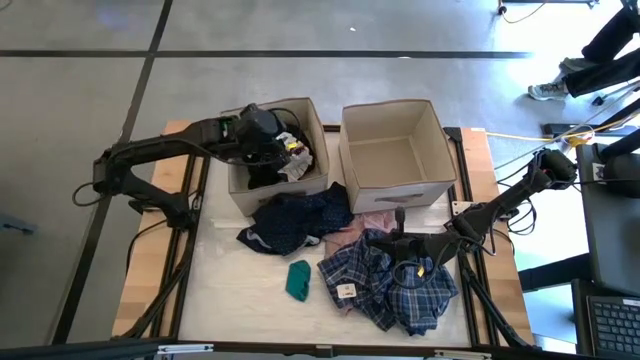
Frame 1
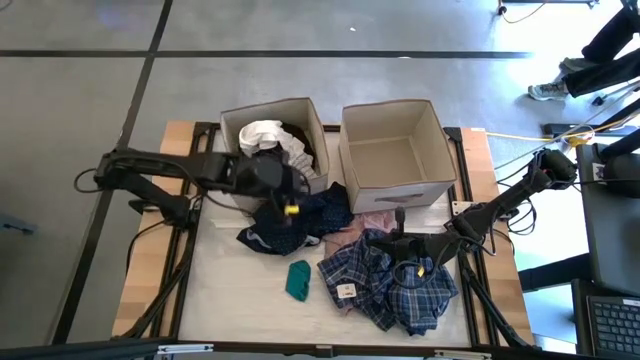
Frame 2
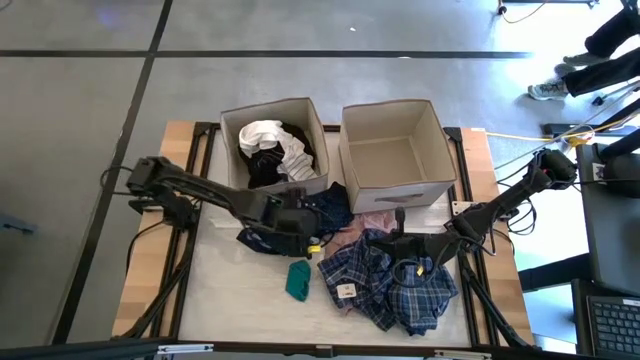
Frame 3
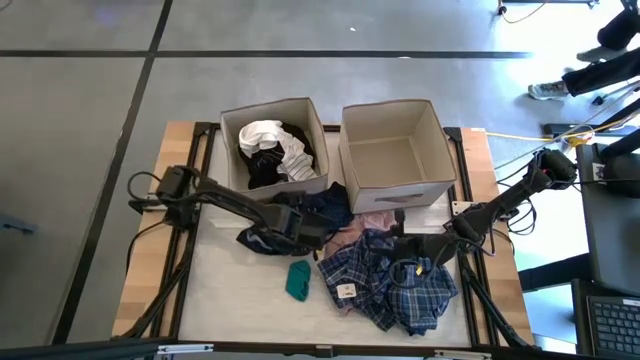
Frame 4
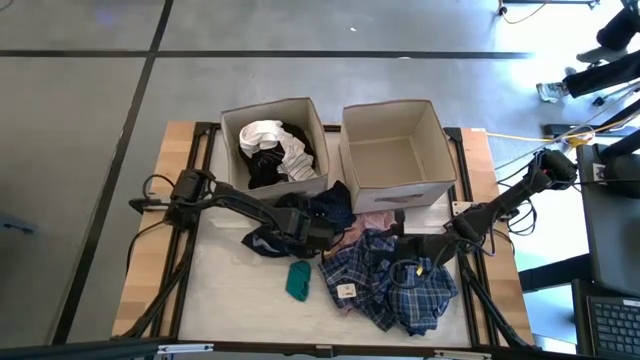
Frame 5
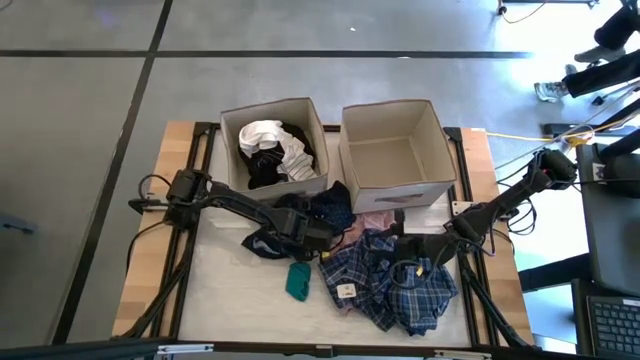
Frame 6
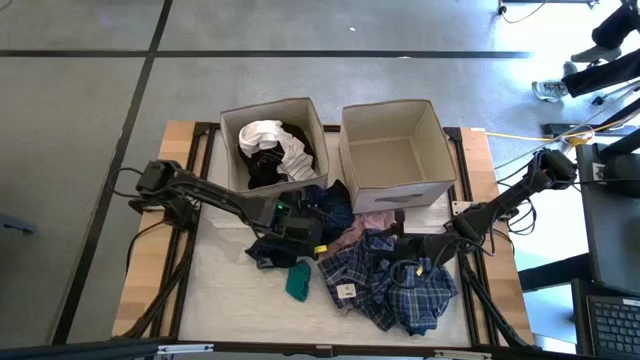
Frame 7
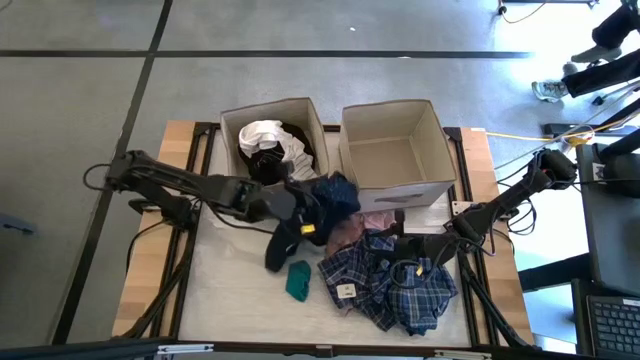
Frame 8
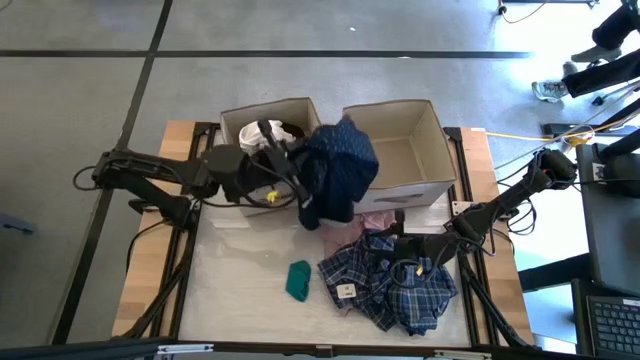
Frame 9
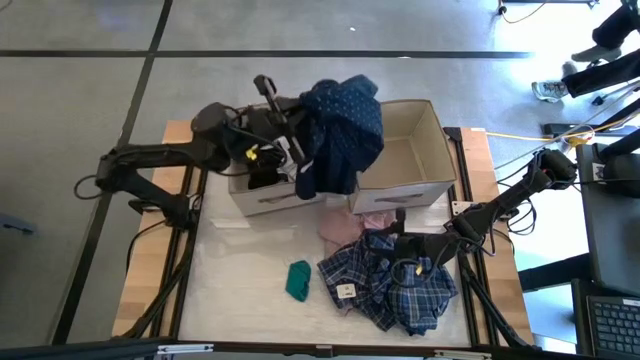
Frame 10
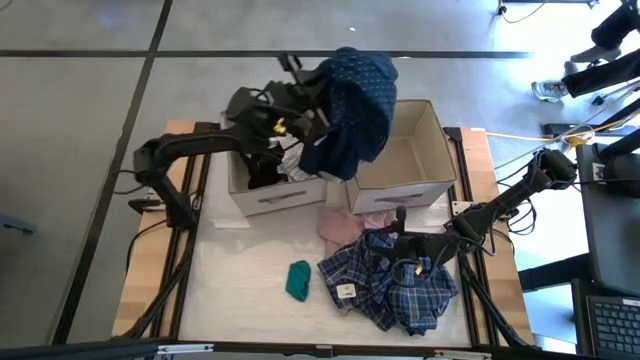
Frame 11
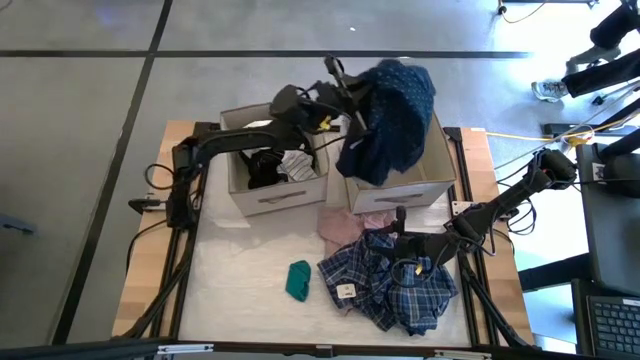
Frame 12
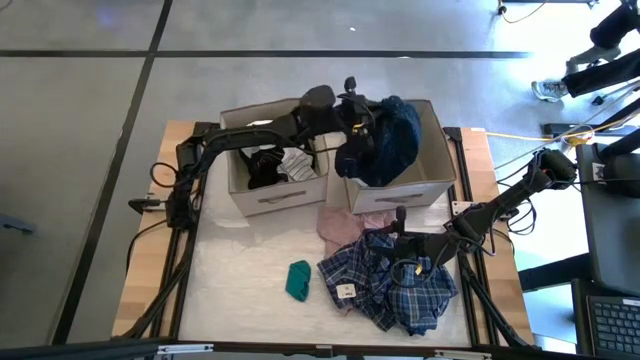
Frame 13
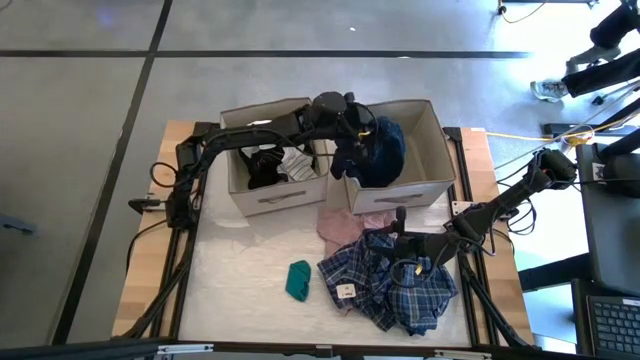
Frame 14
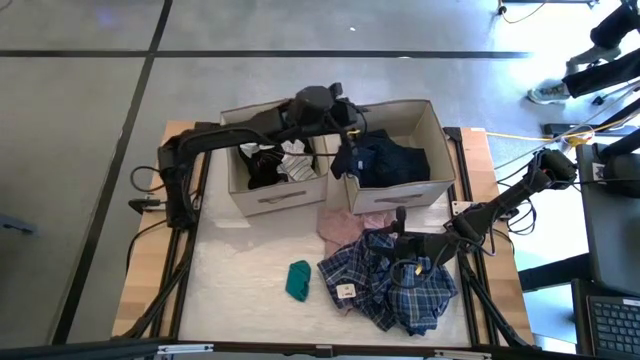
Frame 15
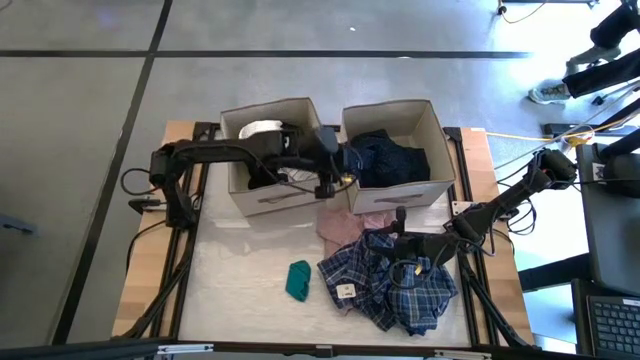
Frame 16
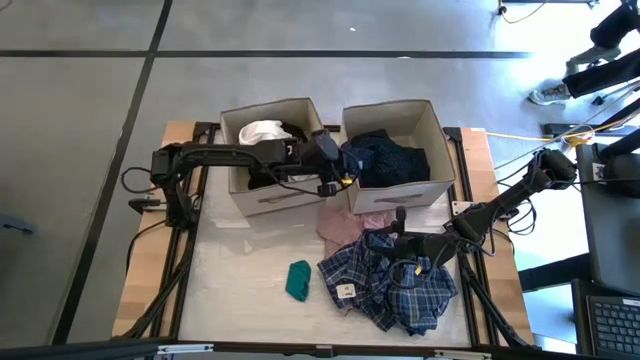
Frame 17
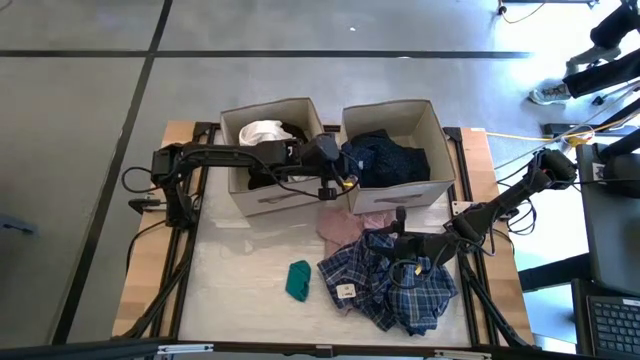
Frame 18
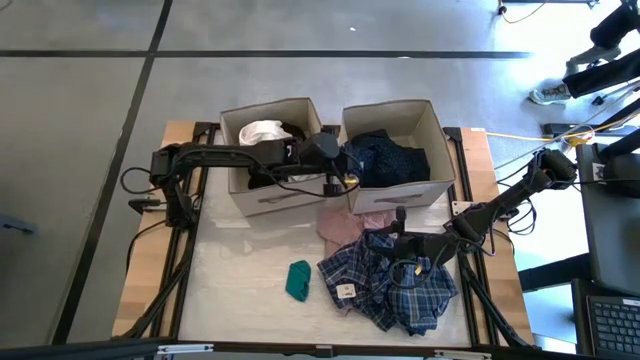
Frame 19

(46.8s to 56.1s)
Task: Sort clothes
Put the dark blue polo shirt into the right laundry organizer

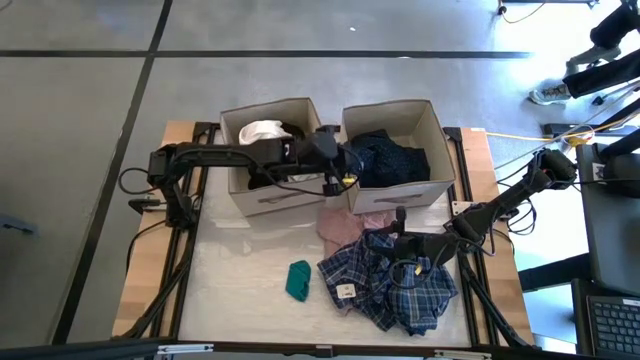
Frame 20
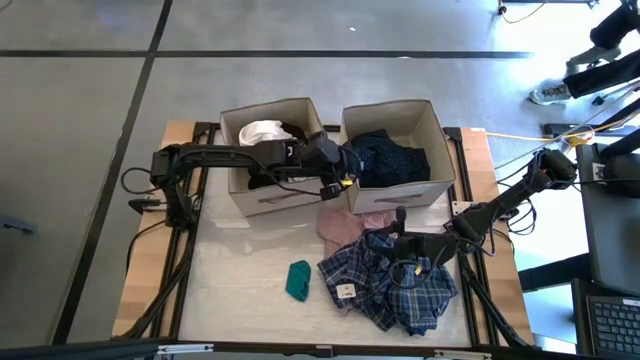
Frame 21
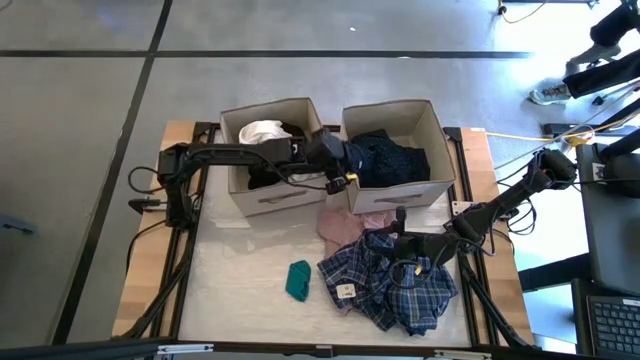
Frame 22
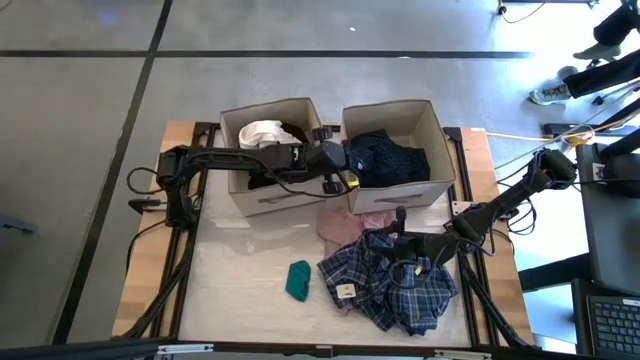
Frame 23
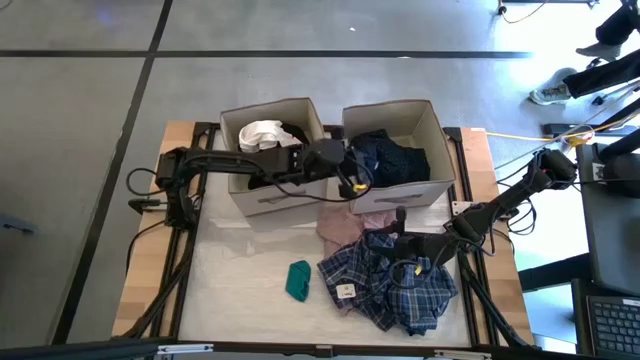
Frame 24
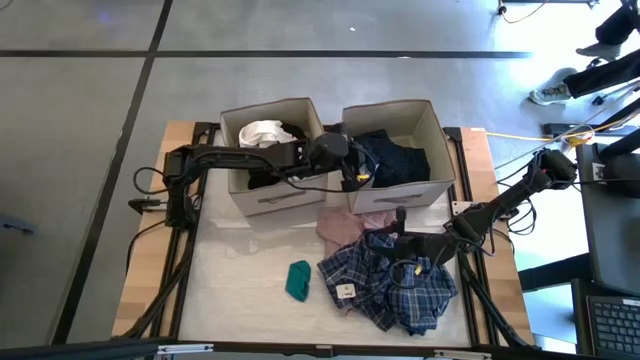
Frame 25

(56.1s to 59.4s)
Put the blue polo shirt into the right laundry organizer

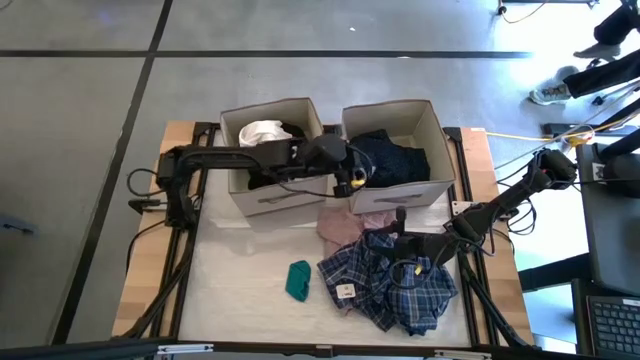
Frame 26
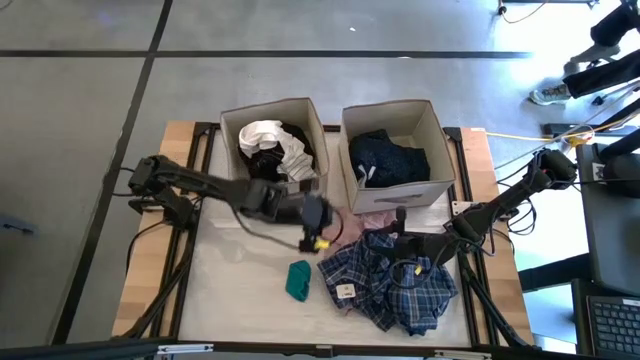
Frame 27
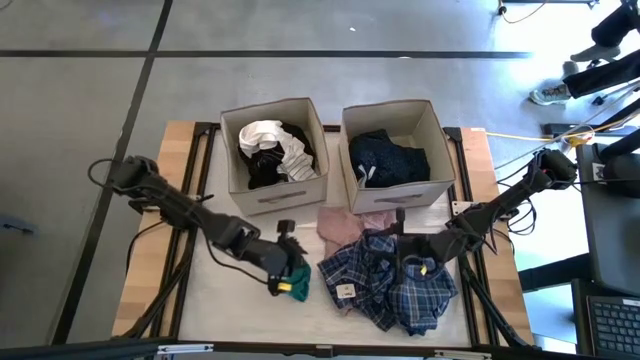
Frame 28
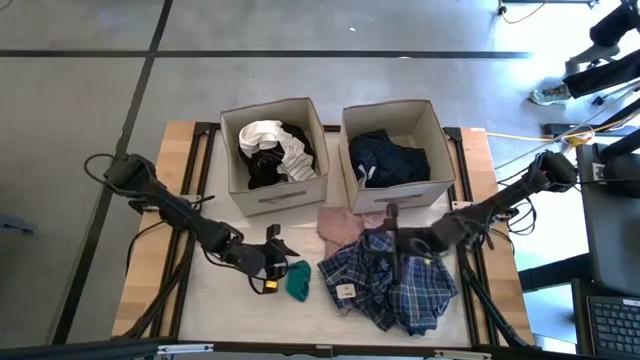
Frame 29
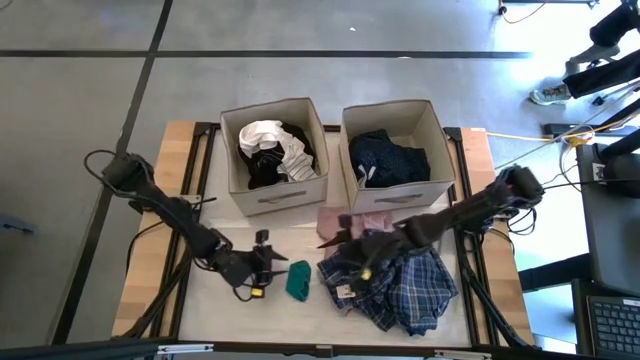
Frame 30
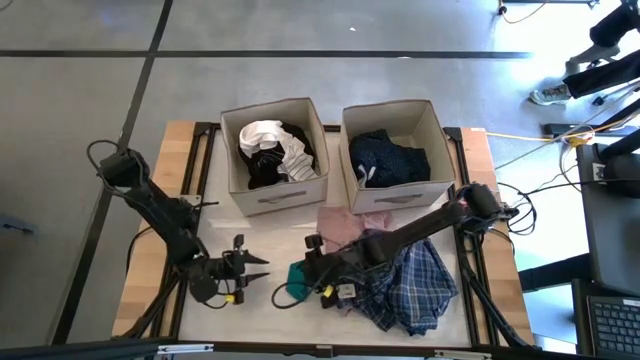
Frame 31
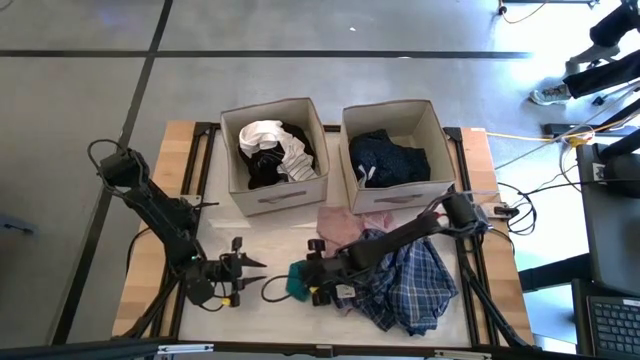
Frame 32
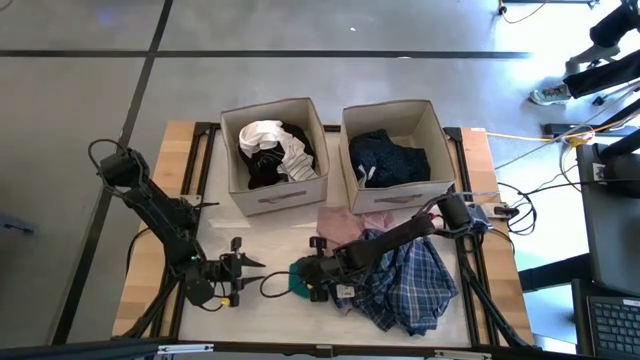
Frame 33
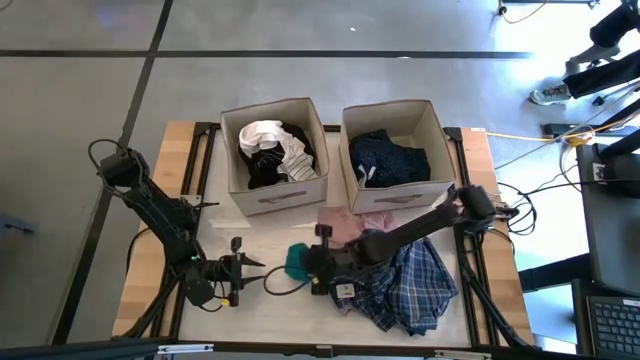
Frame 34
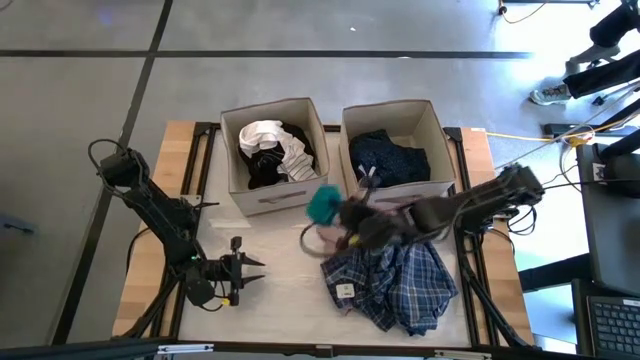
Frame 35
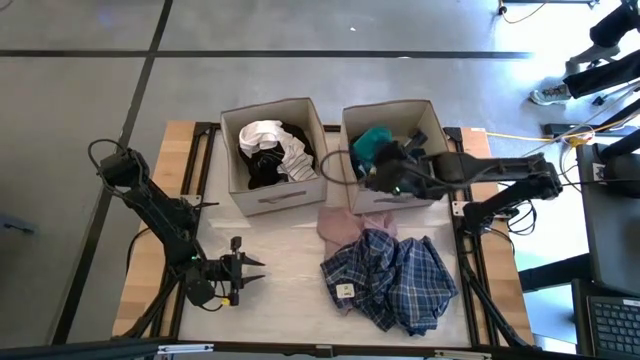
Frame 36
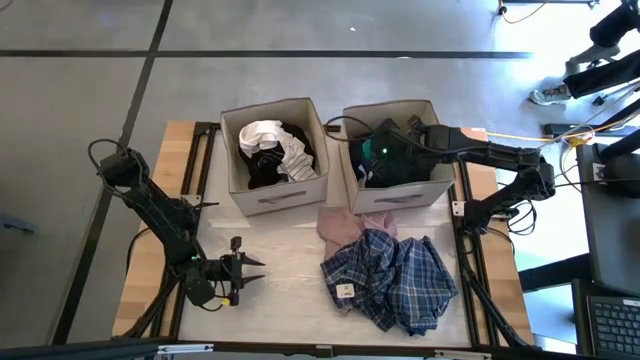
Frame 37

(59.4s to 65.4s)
Put the green sock into the right laundry organizer

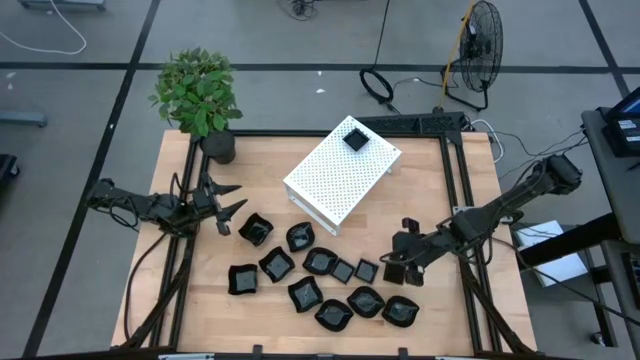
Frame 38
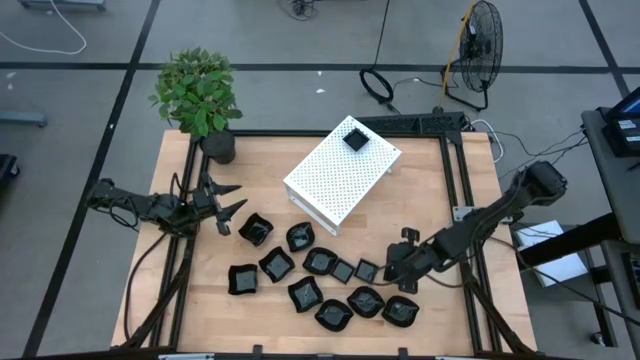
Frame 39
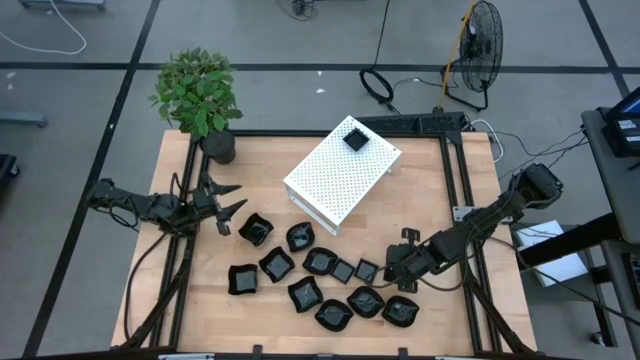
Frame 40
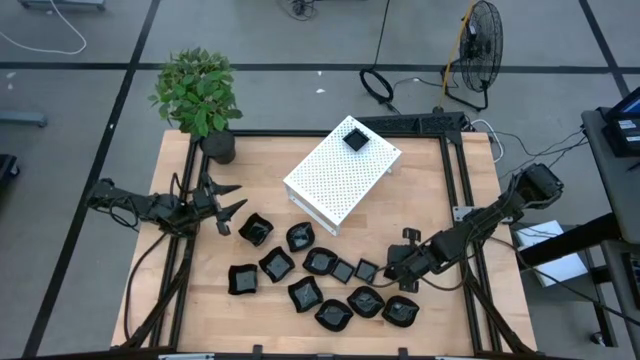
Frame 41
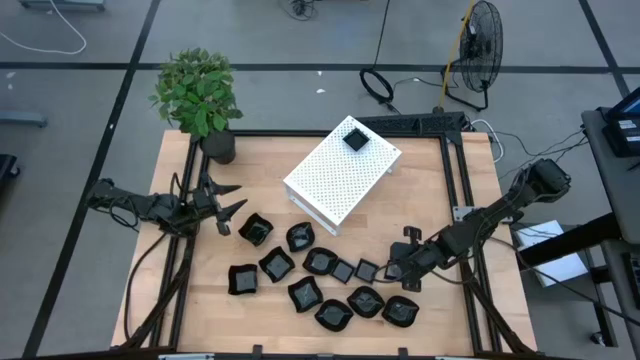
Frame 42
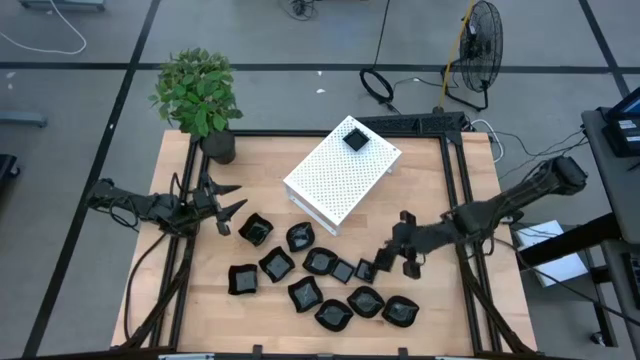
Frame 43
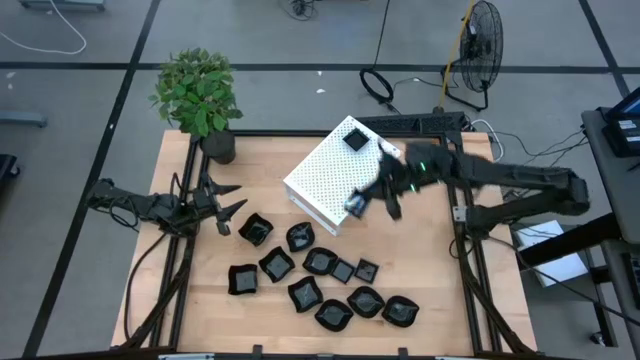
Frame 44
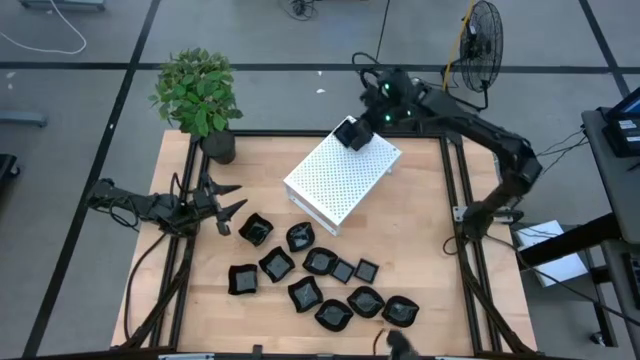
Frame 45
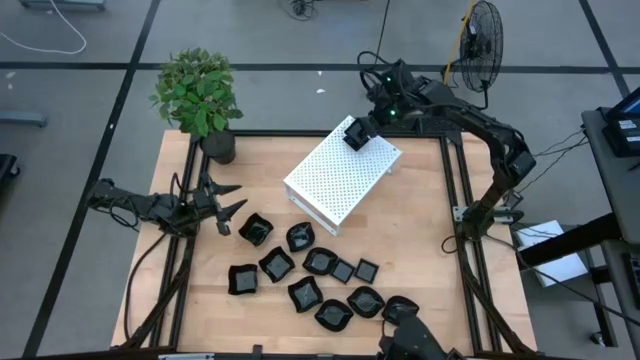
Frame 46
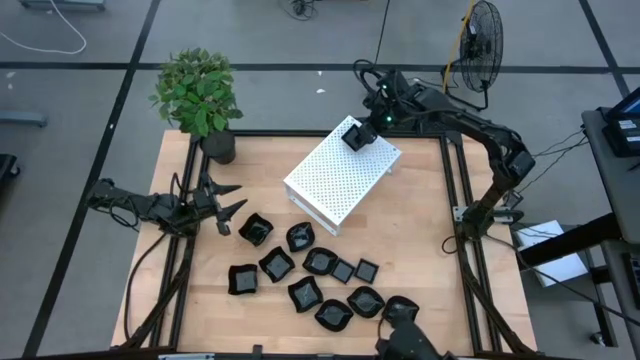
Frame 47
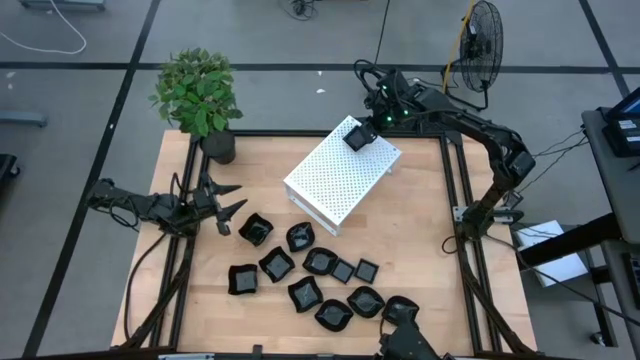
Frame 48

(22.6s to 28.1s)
Task: Pick & Place Mini shaped plates
Stack the black square plate on top of the black square plate on the shelf
